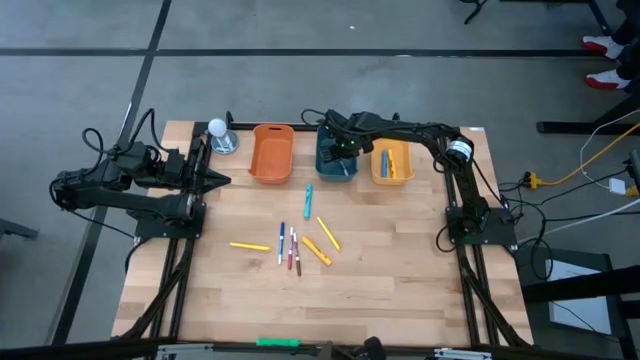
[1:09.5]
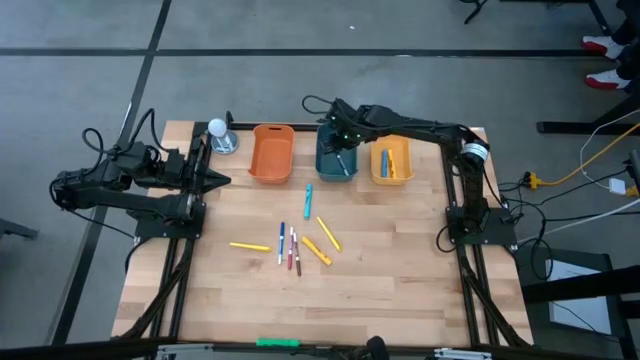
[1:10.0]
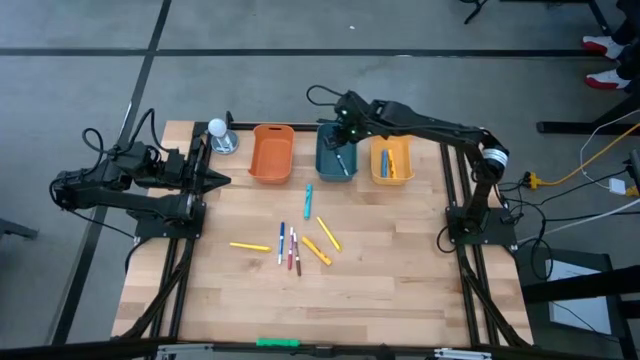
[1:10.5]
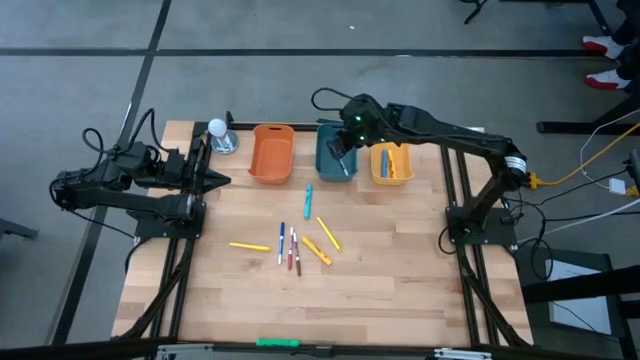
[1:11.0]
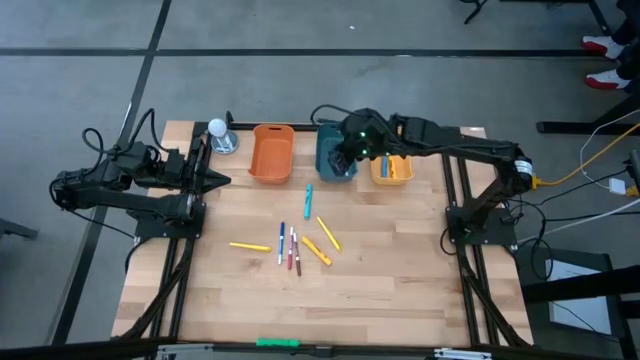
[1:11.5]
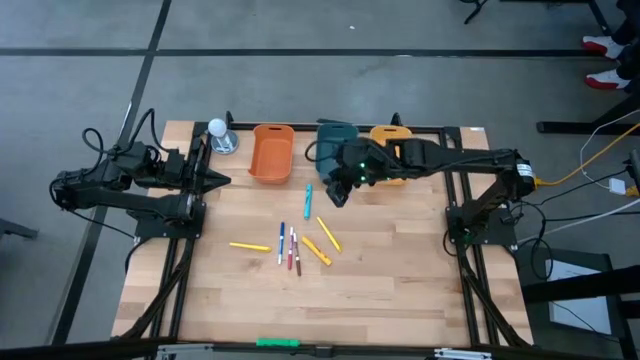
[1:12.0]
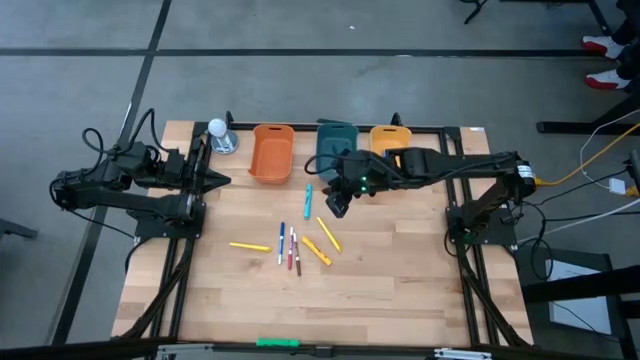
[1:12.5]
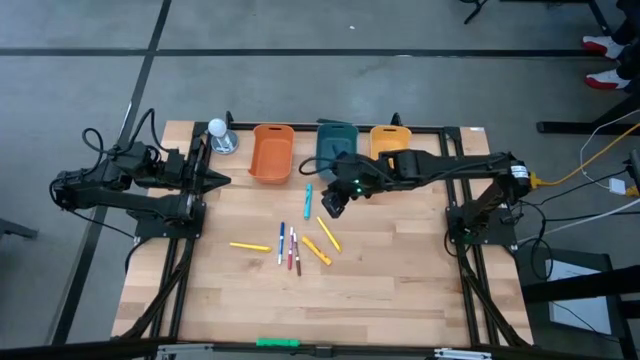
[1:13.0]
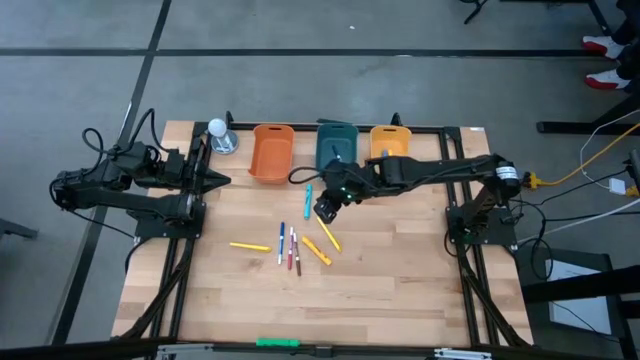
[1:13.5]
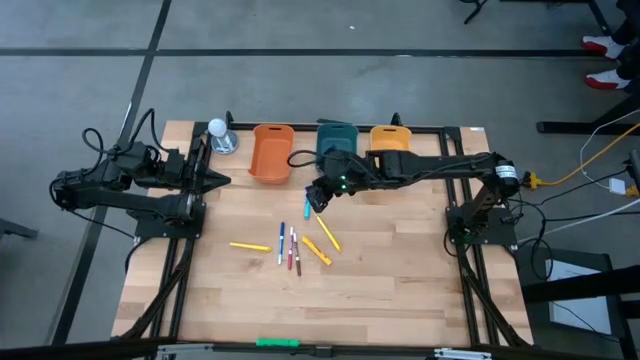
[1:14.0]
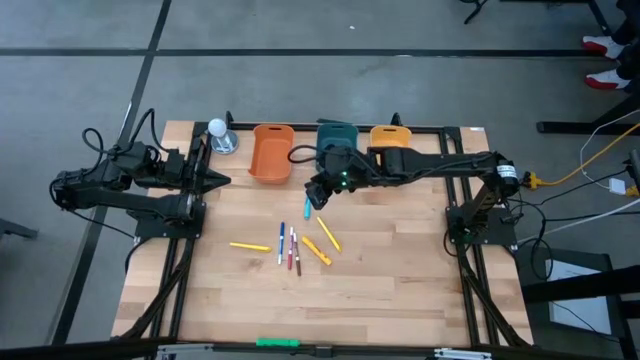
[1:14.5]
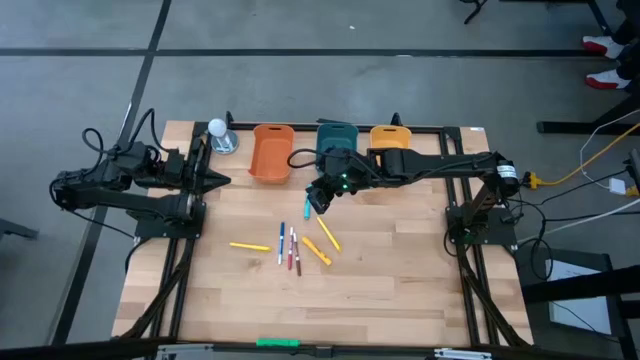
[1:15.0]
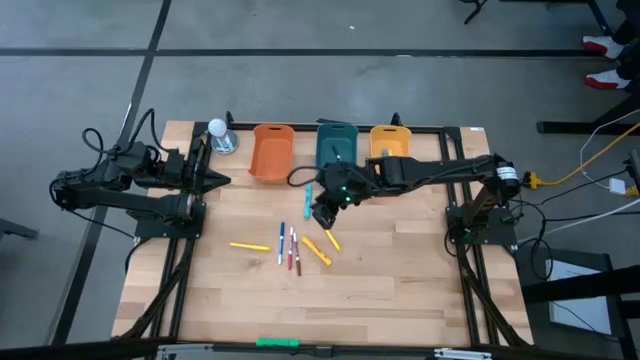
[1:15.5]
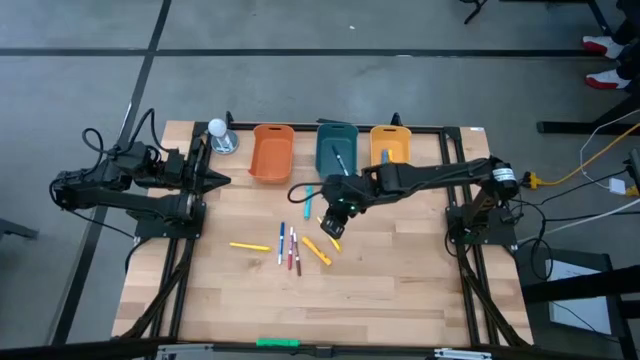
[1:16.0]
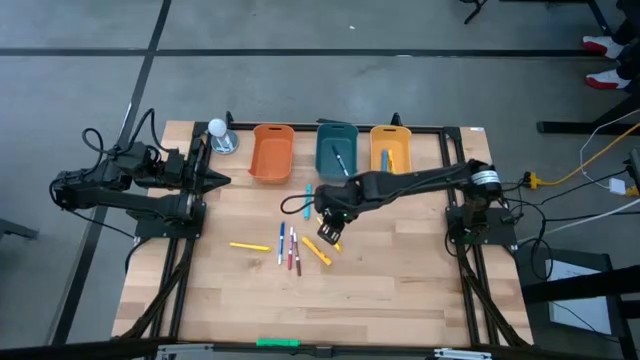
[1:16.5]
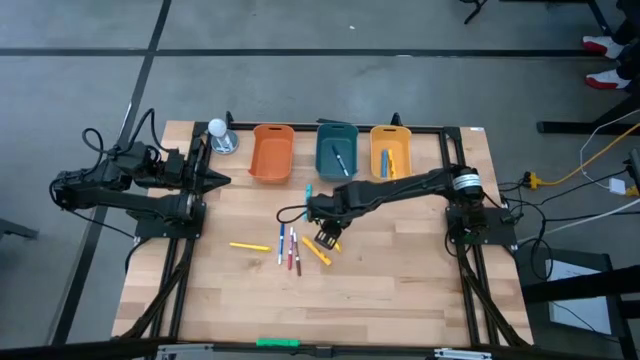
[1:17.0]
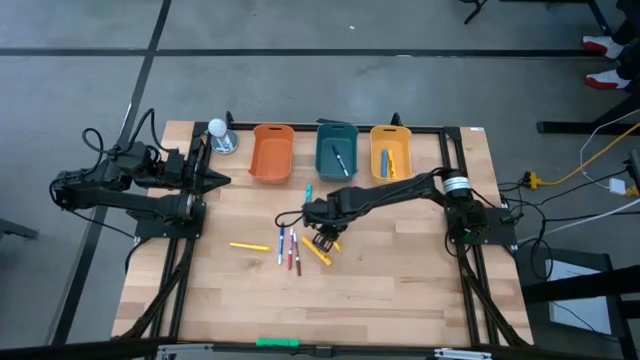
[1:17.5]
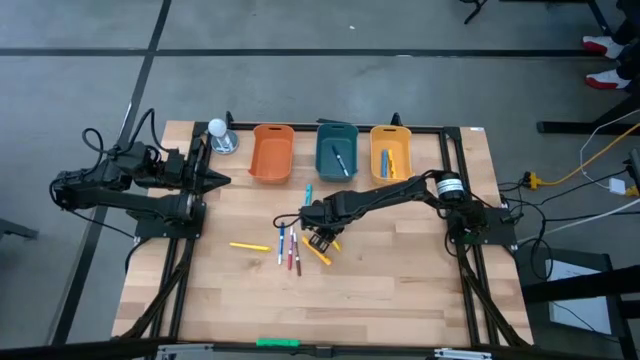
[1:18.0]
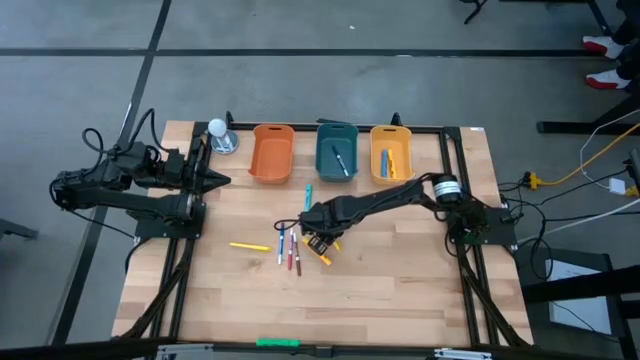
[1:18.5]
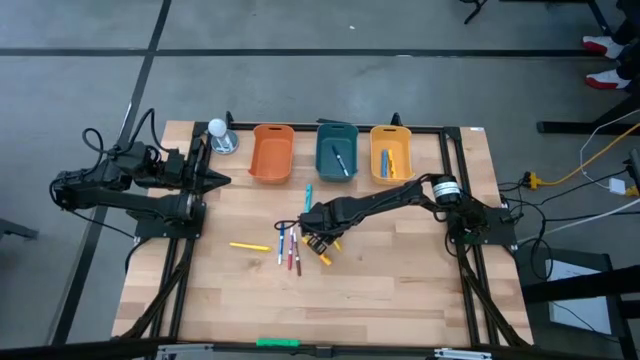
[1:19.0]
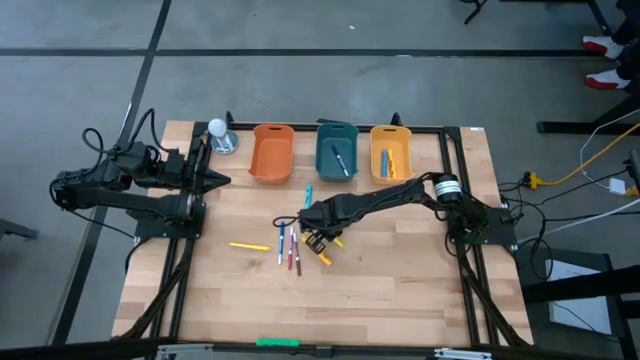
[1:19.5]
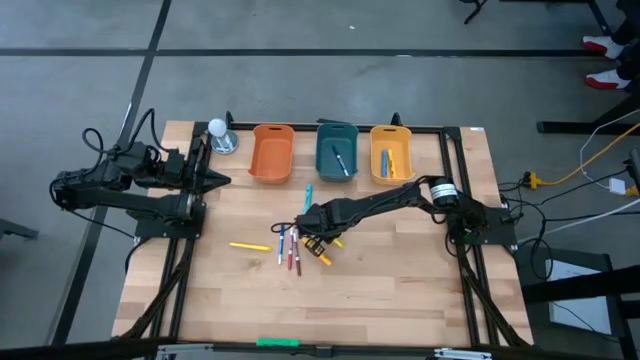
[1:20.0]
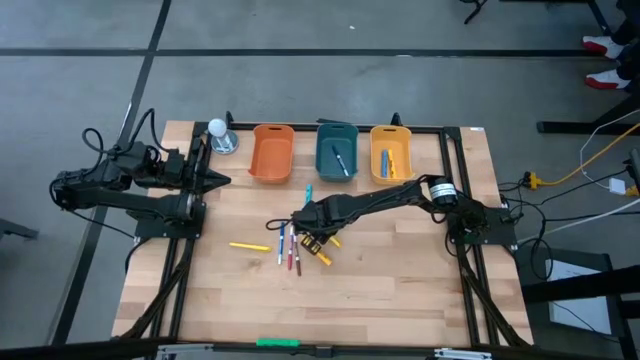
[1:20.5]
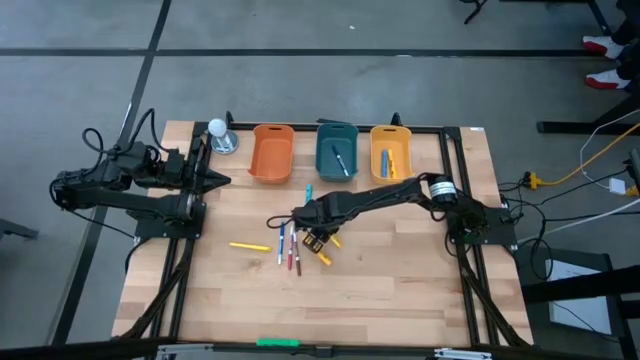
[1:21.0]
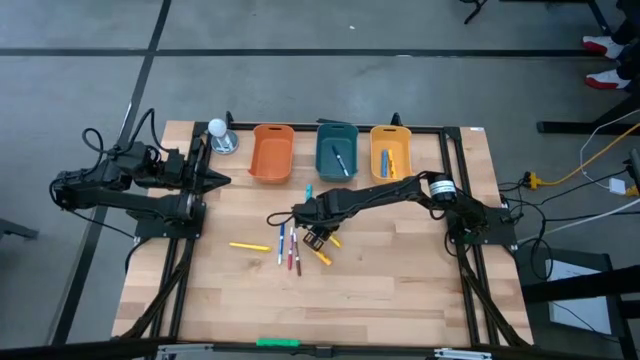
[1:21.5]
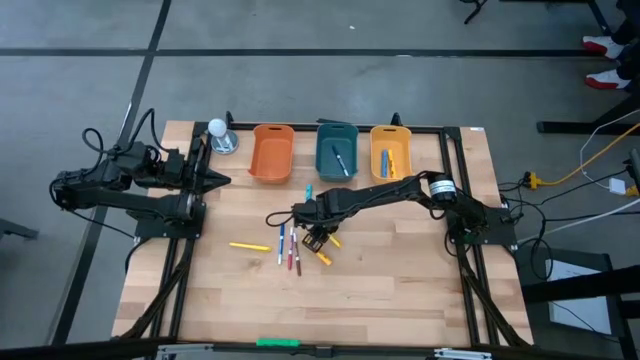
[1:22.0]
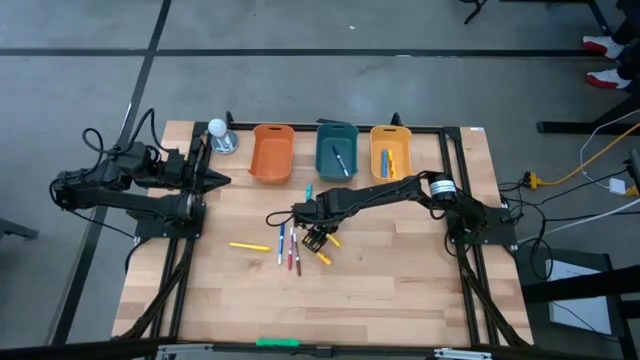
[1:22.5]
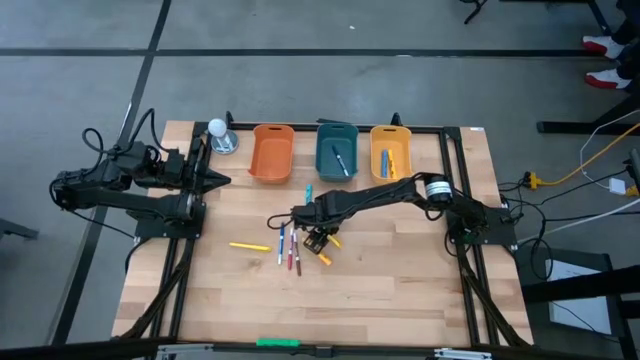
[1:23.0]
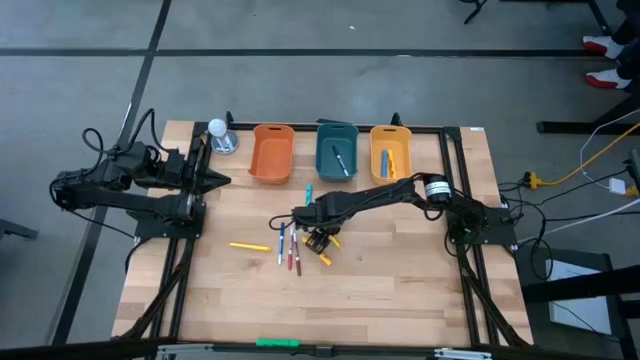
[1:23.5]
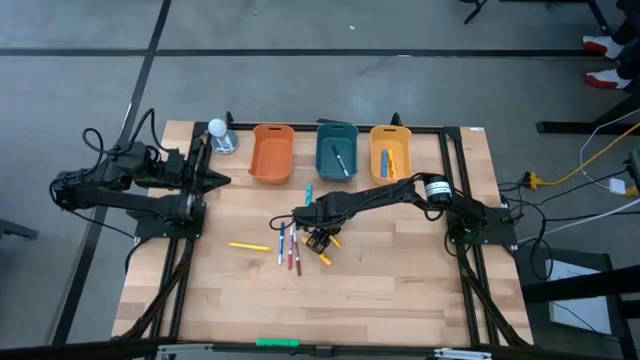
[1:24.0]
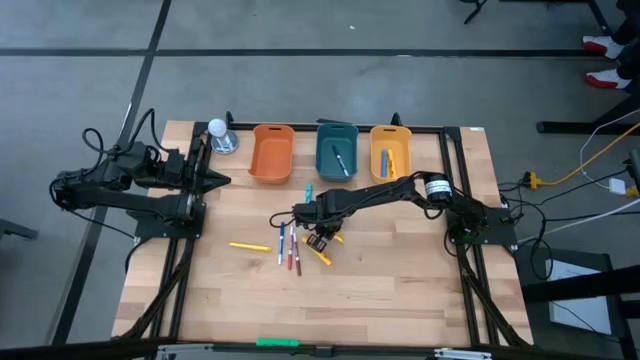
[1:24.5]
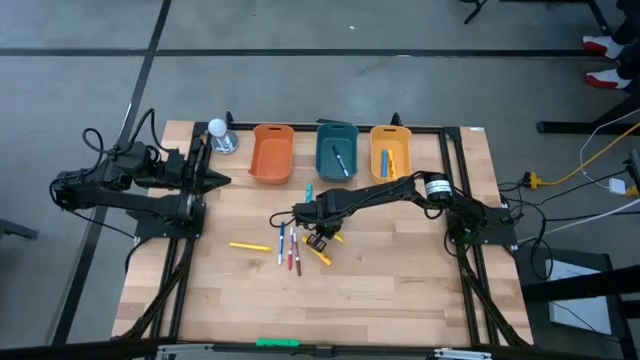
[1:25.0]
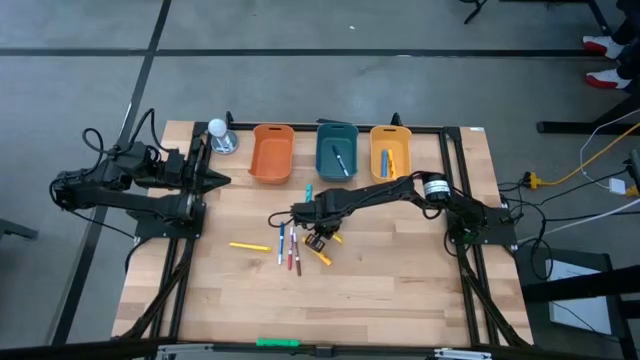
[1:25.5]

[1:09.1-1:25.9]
Task: Pick & Place Markers
Put the right yellow pen into the orange bin

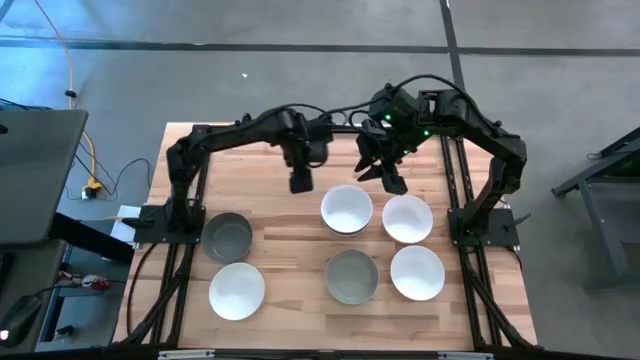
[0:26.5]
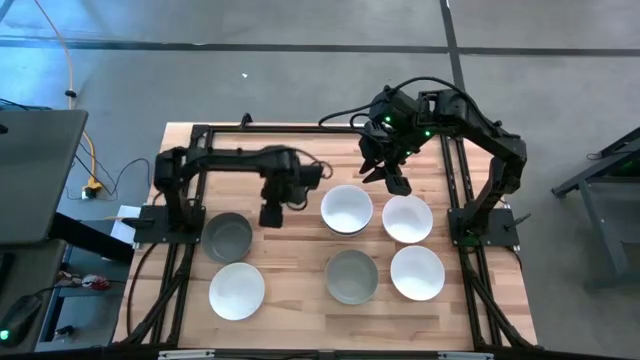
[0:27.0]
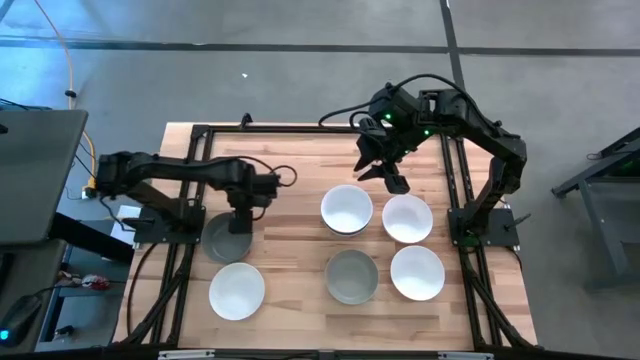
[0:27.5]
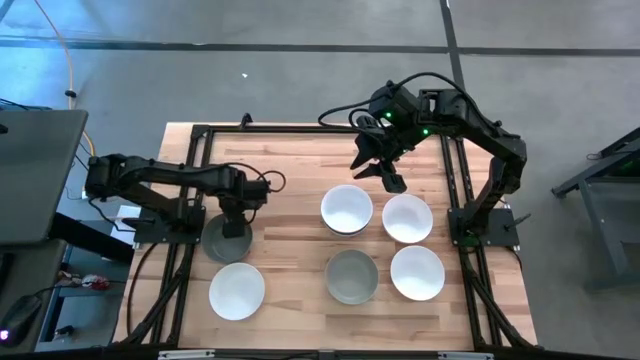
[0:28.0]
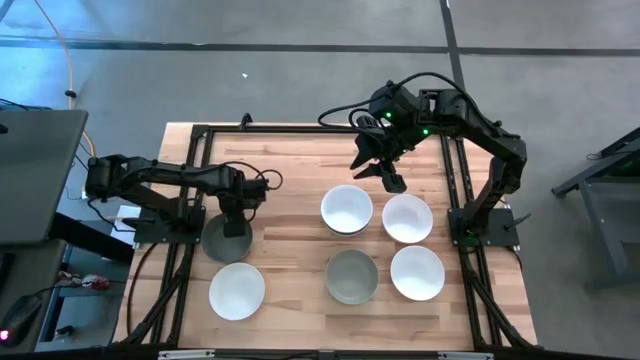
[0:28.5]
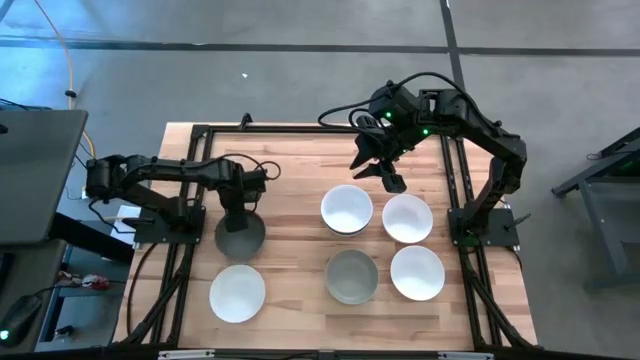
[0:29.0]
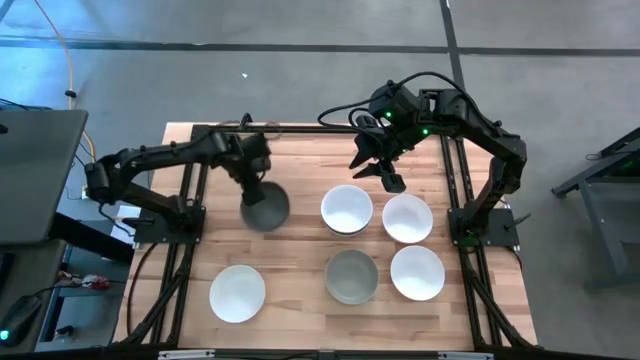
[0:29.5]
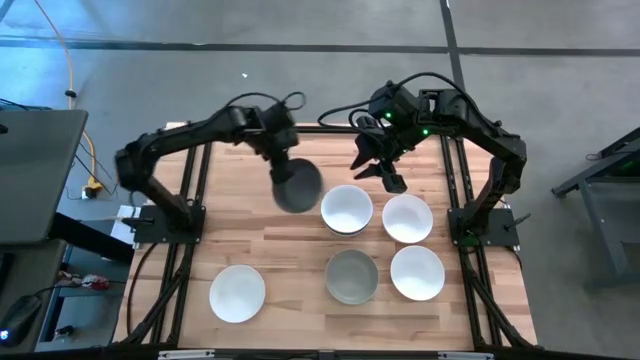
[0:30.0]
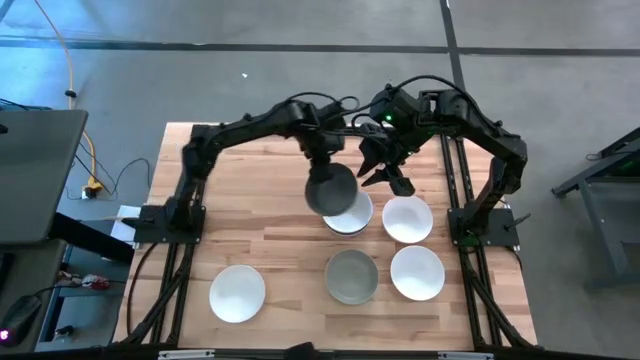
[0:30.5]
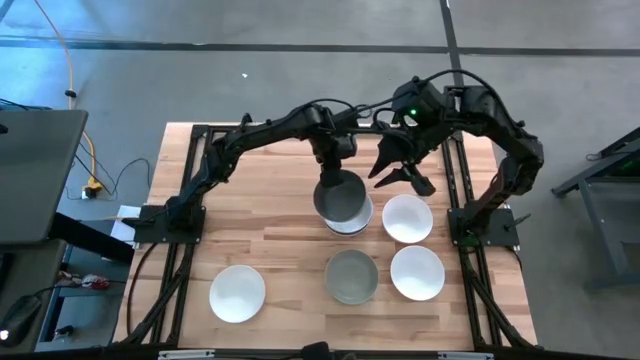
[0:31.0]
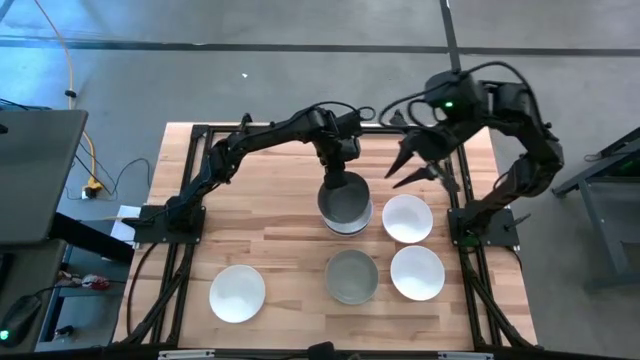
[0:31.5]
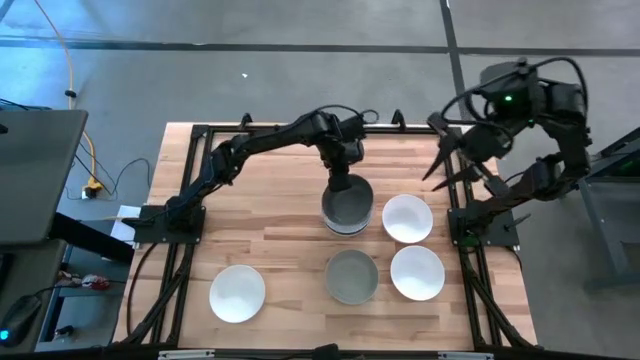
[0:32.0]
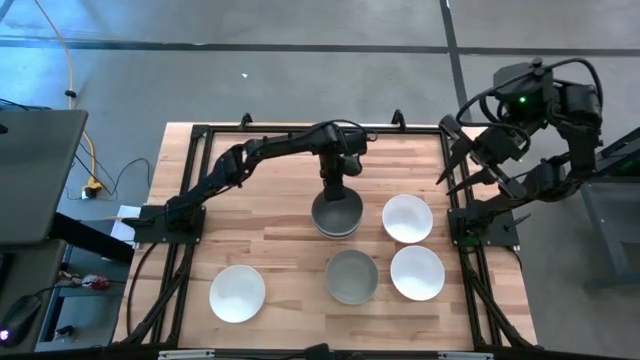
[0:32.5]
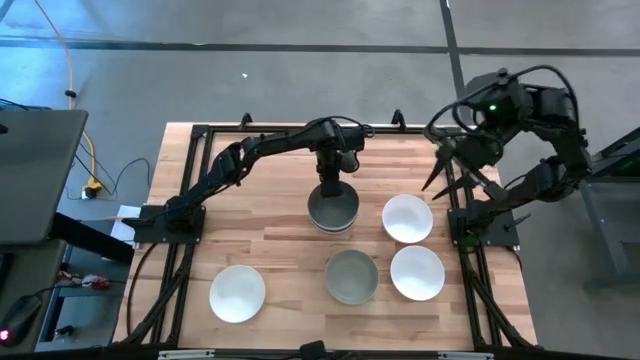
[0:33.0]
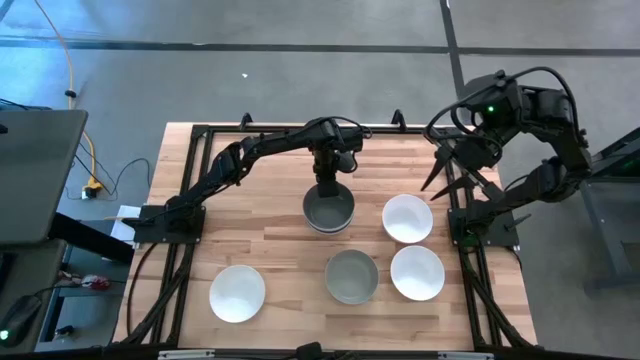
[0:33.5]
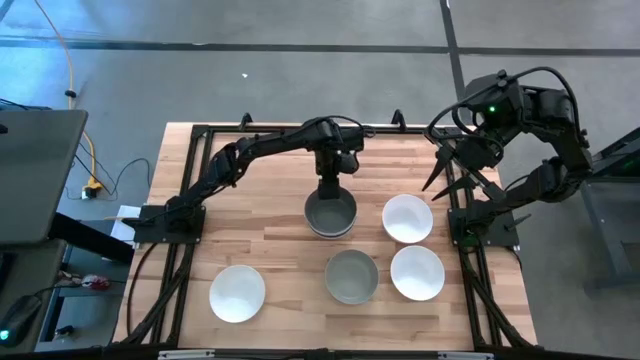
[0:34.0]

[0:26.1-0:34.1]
Task: Nest bowls inside each other
Stack the top gray bowl on top of the top left white bowl
